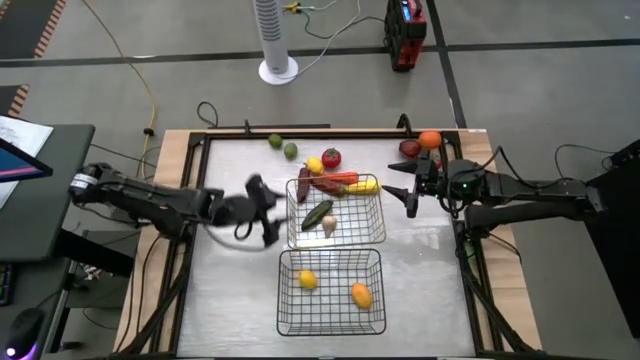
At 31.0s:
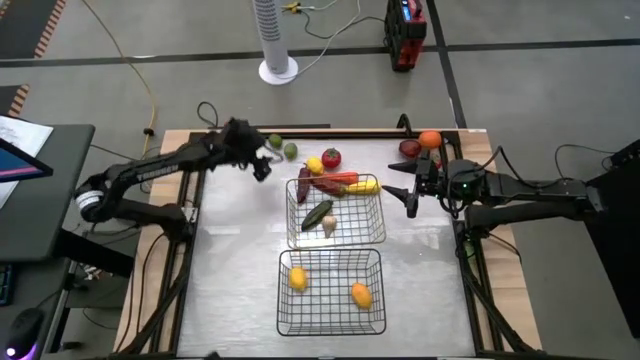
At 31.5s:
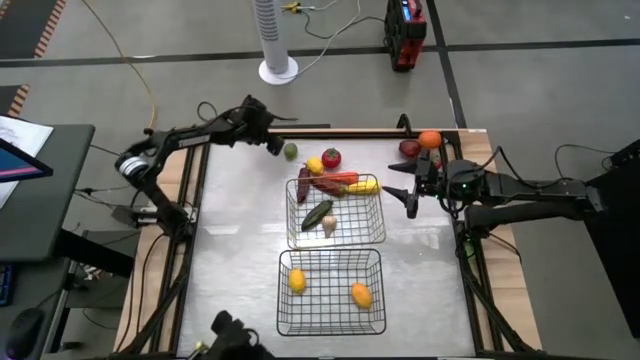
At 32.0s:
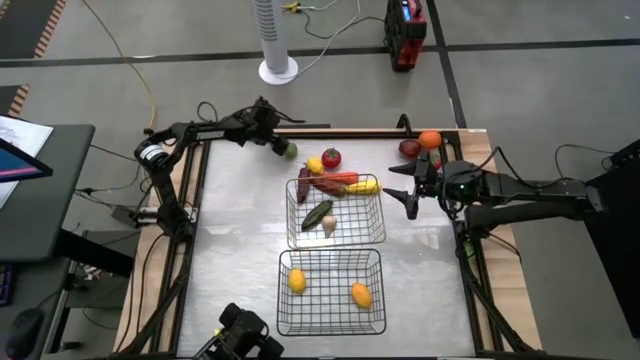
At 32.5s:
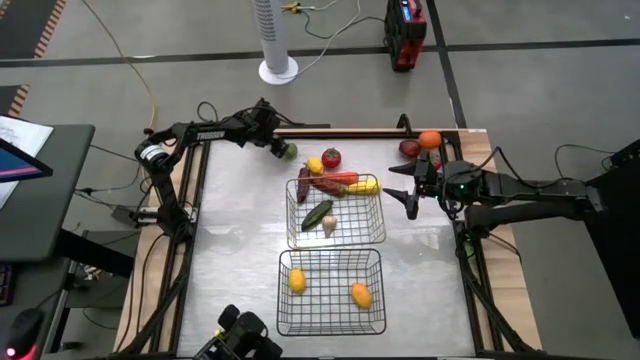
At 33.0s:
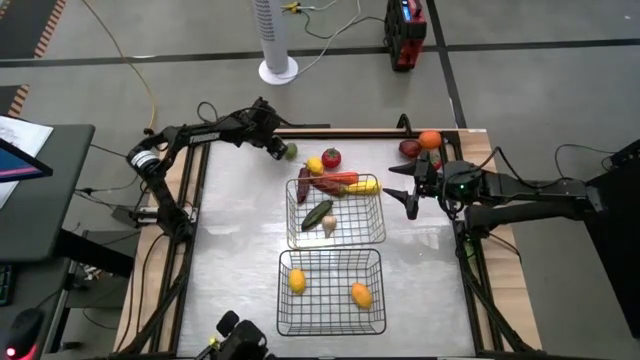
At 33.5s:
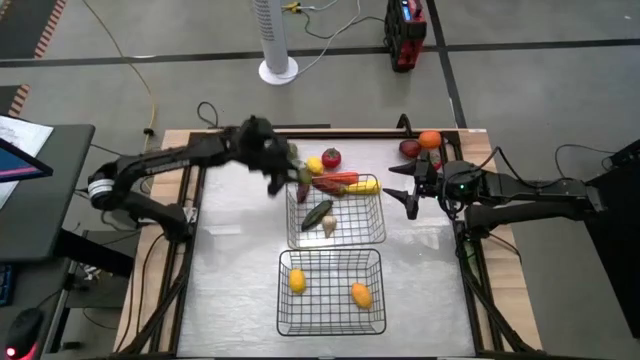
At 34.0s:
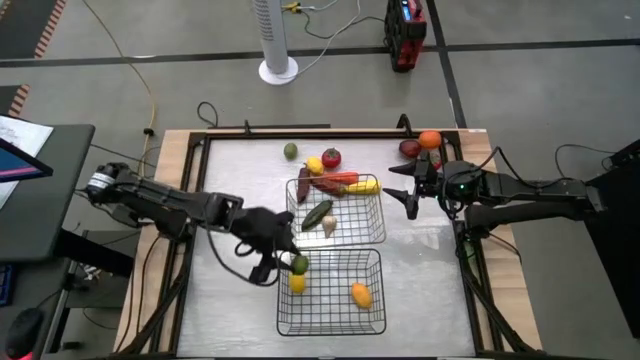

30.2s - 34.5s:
Task: Sort produce into baskets
Put the lime into the bottom wire basket

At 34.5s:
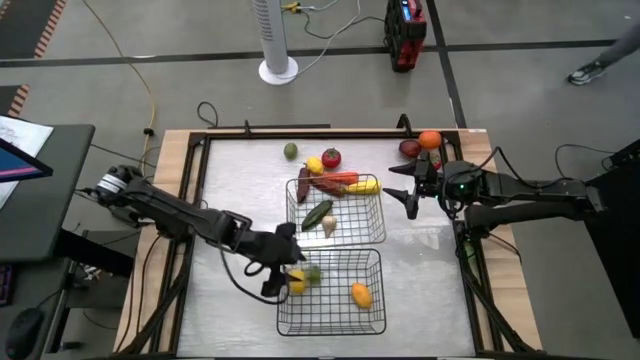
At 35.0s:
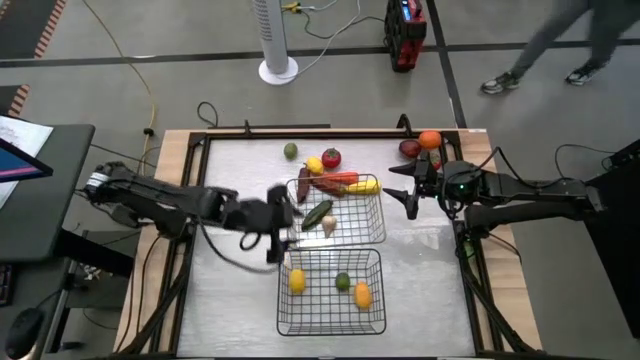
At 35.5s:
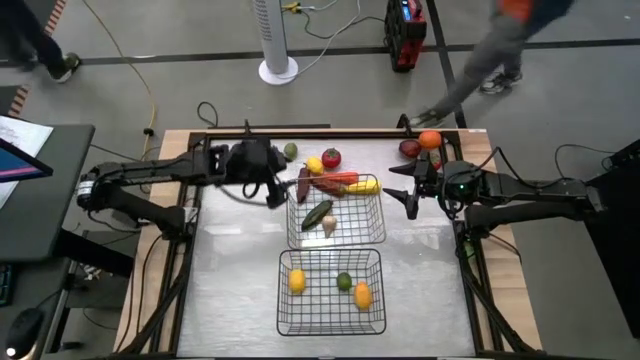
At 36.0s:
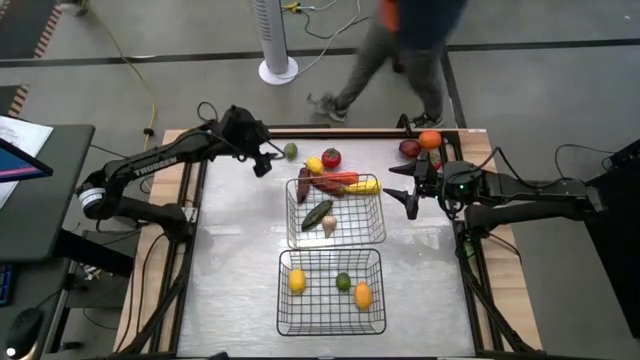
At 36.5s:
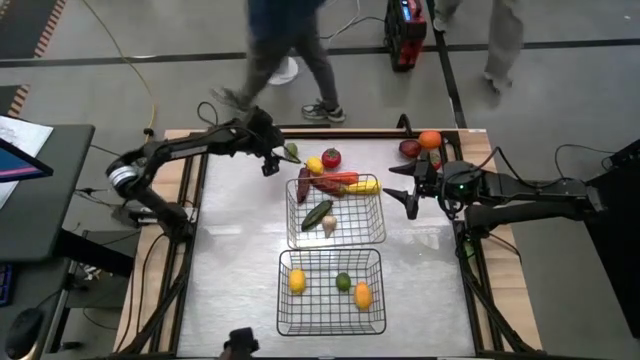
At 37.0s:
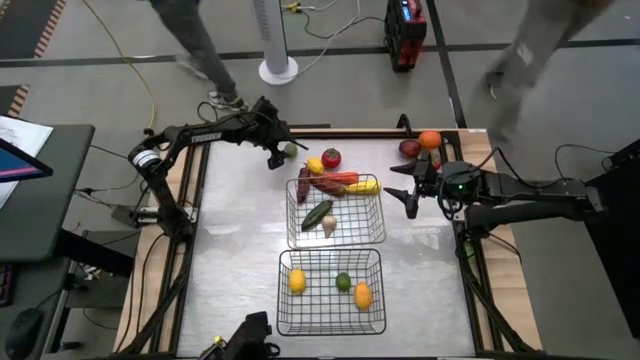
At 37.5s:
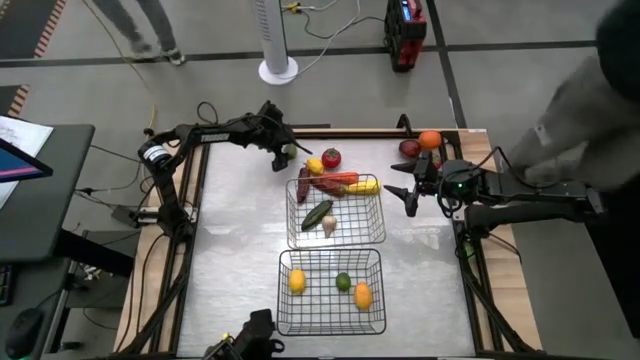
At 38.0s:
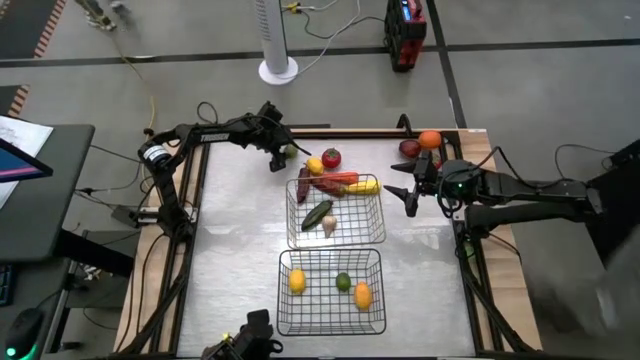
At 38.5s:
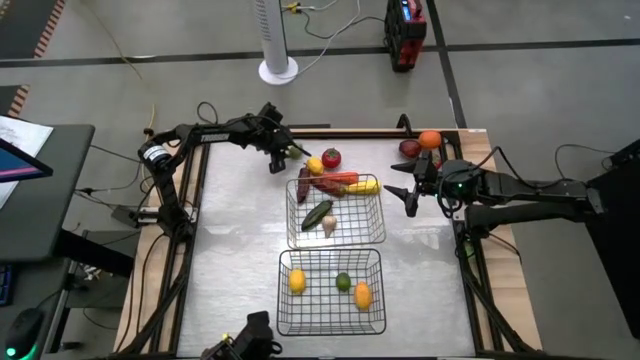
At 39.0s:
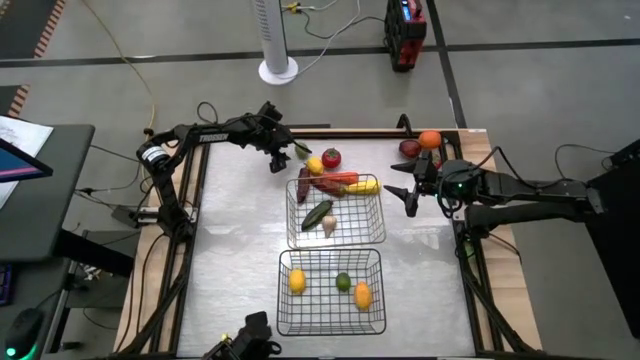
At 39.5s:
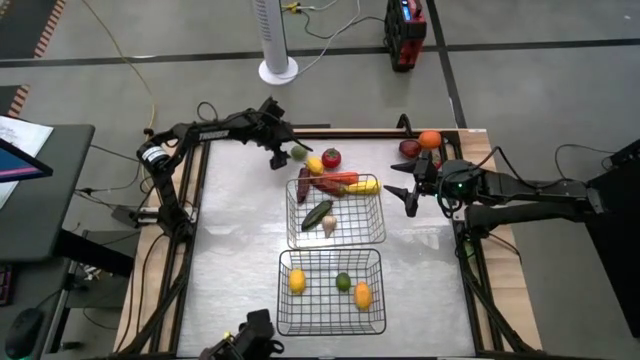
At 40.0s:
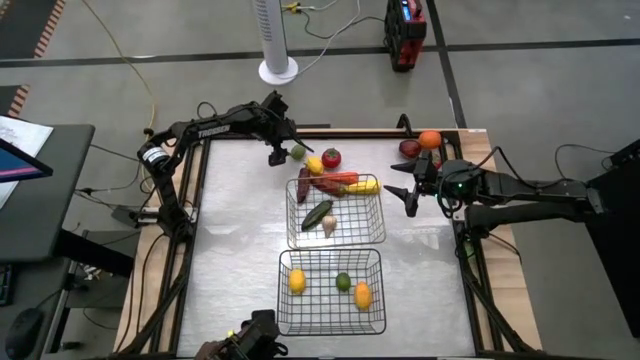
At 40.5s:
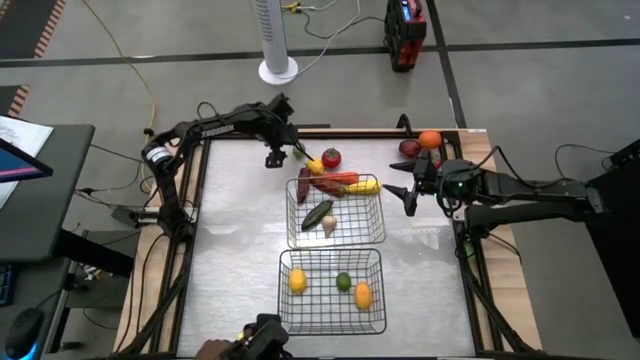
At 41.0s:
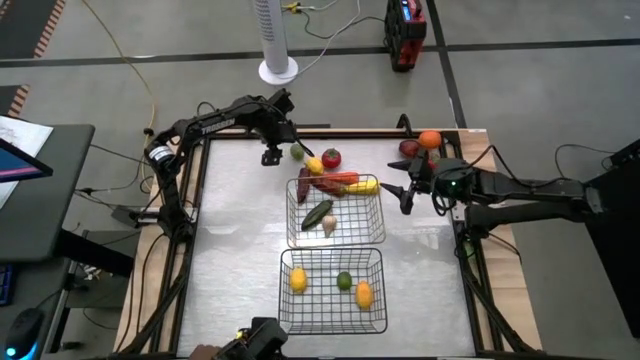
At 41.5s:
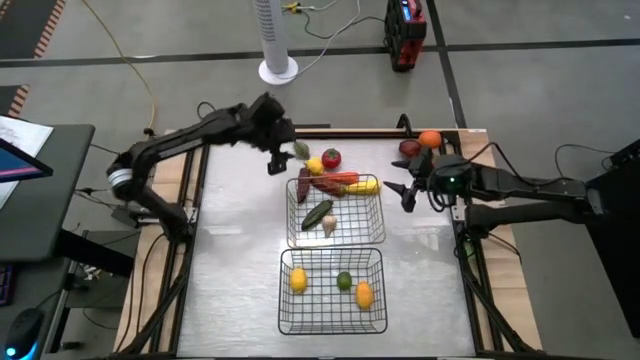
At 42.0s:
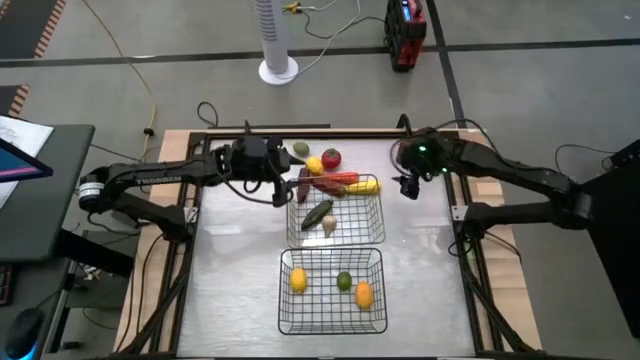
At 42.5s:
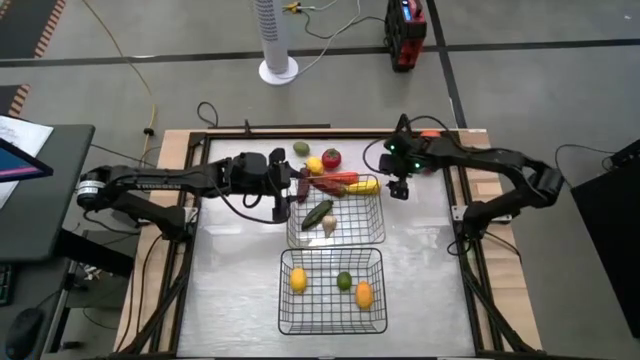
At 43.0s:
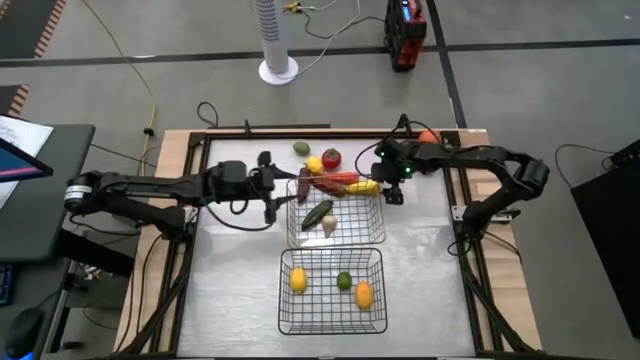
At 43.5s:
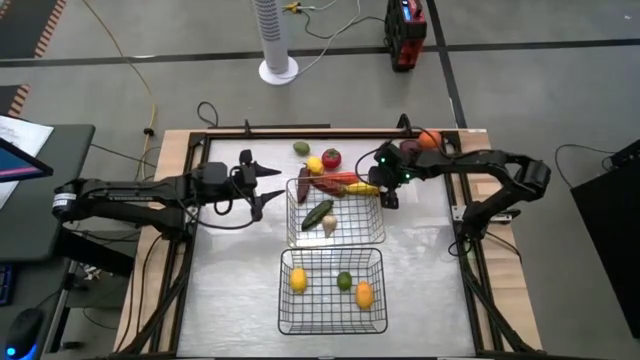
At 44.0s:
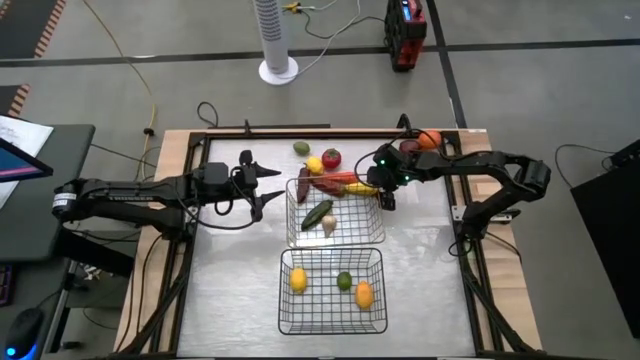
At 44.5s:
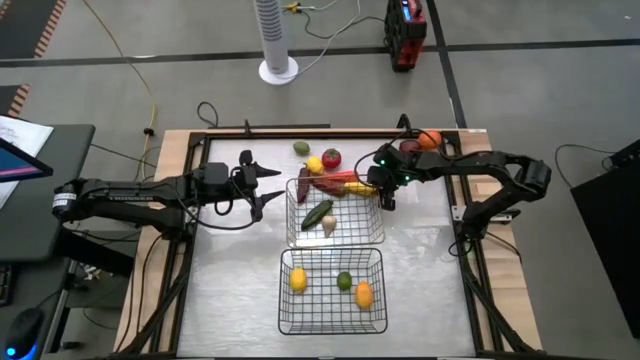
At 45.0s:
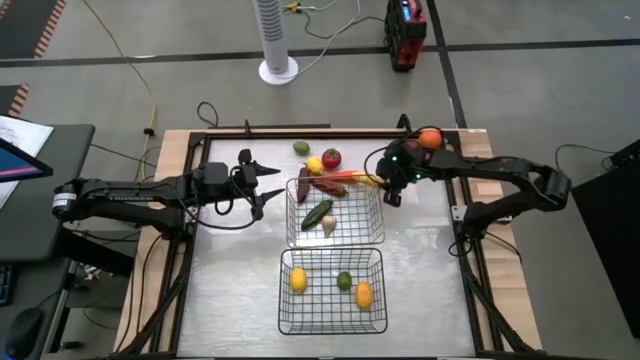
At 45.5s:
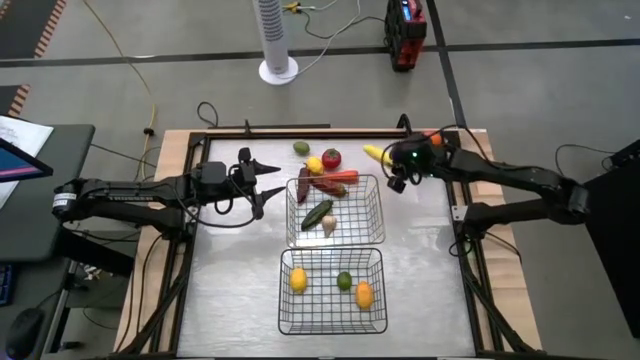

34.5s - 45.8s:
Put the corn into the top wire basket

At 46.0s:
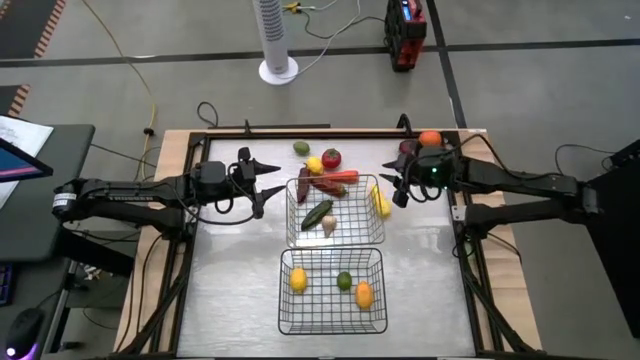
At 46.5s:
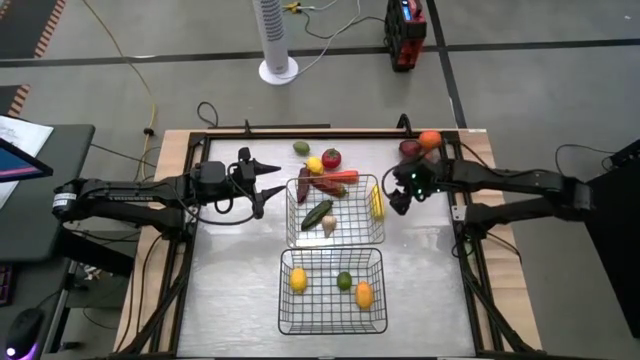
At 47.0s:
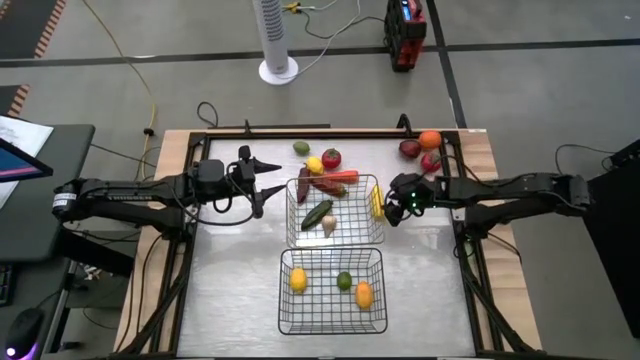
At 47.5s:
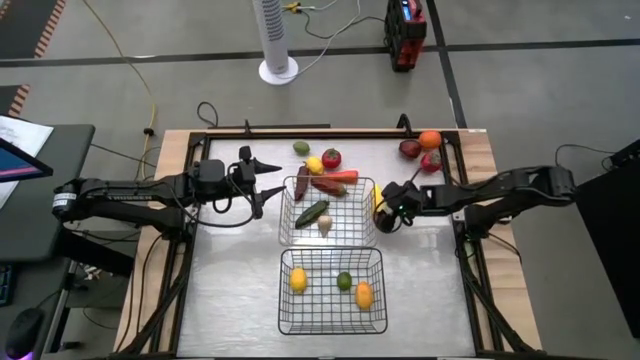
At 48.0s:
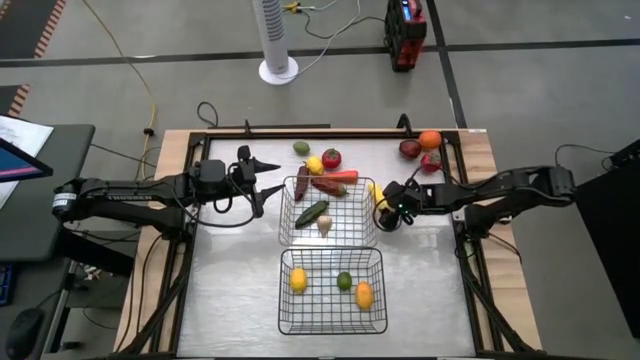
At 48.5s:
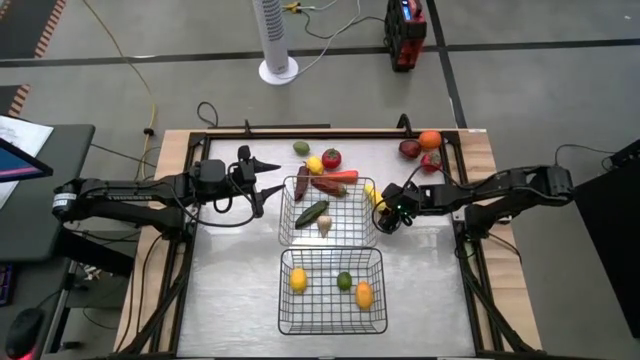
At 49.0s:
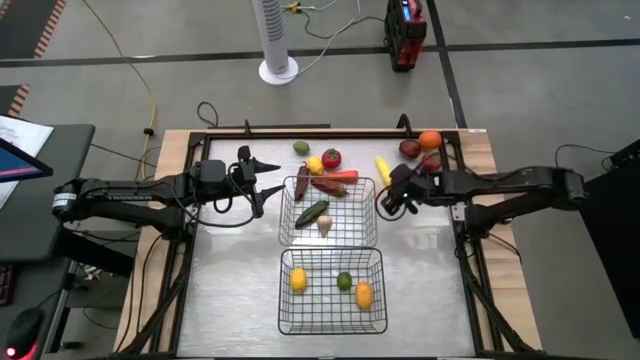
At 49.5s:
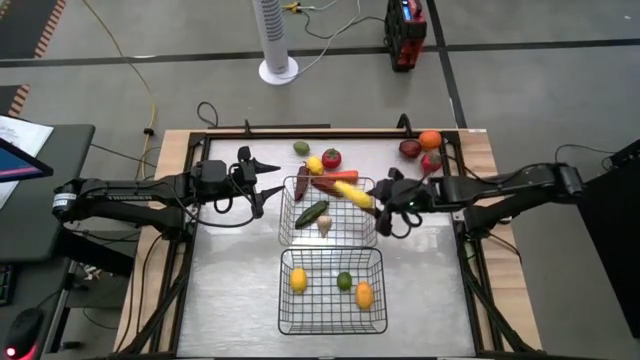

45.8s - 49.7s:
Put the yellow corn into the top wire basket

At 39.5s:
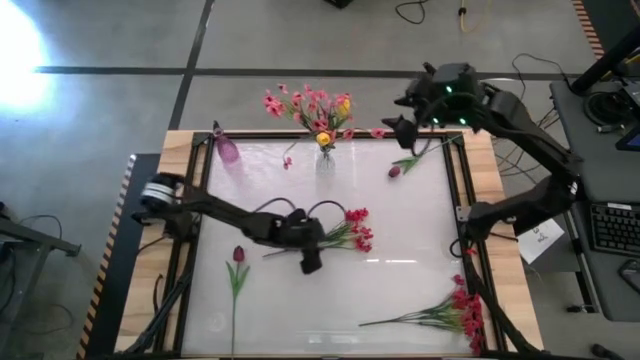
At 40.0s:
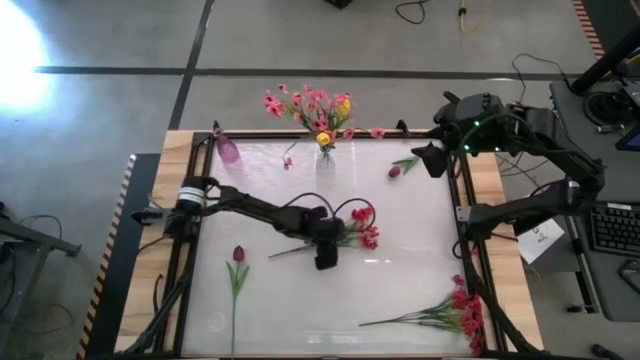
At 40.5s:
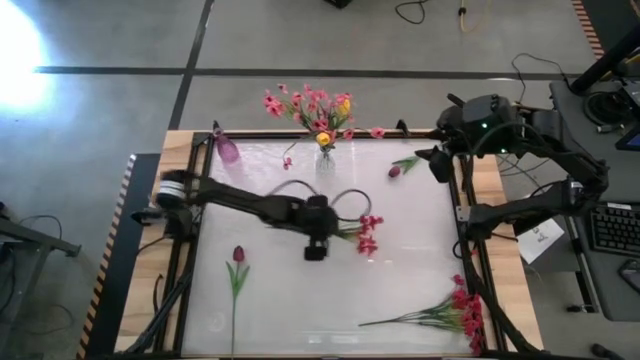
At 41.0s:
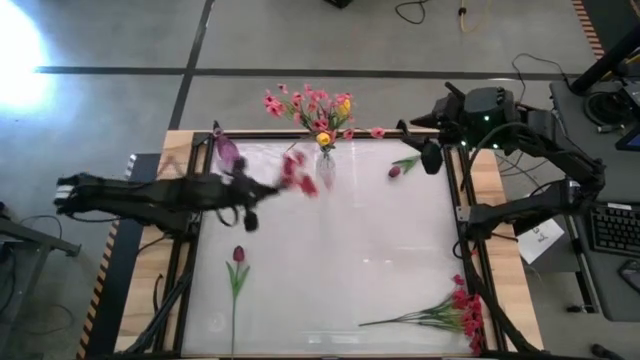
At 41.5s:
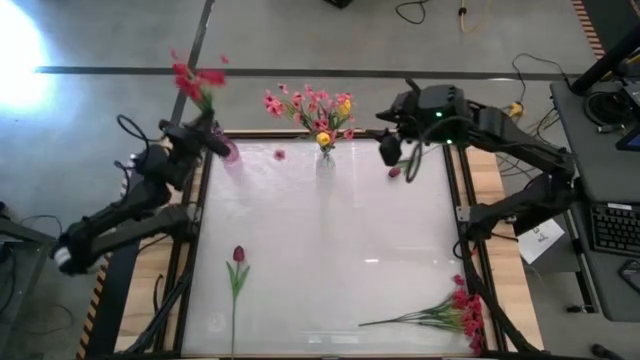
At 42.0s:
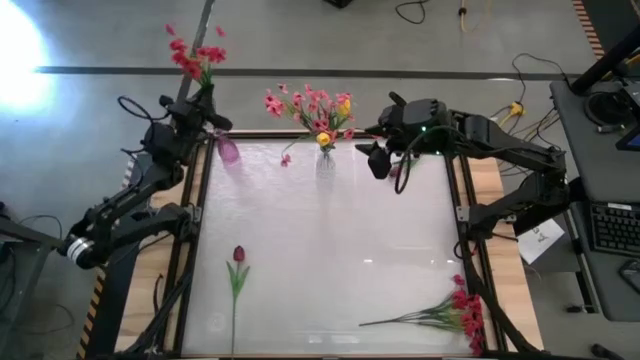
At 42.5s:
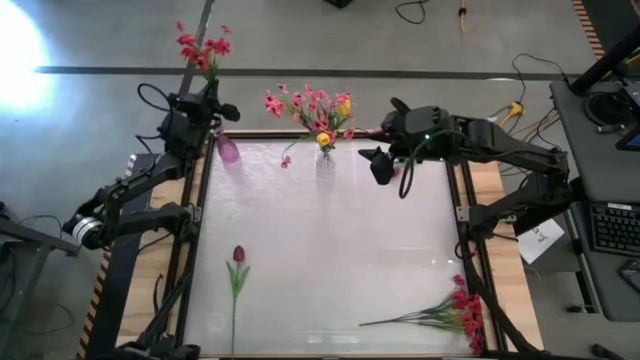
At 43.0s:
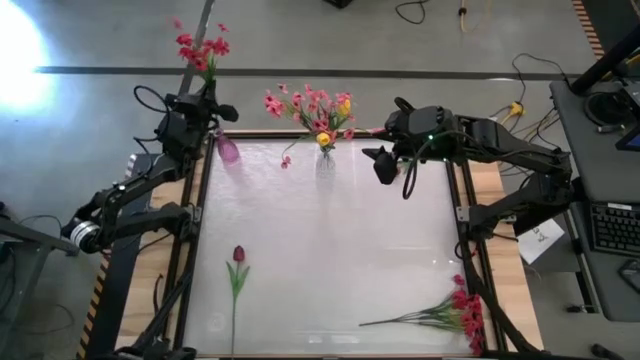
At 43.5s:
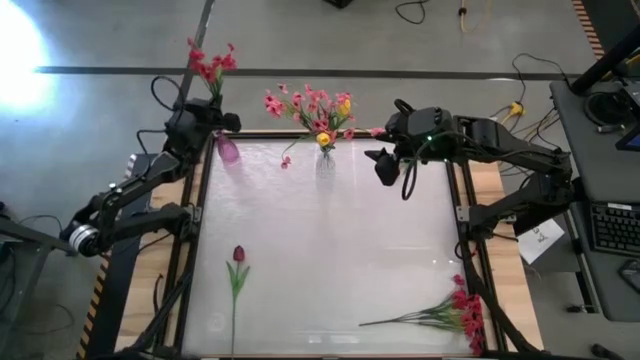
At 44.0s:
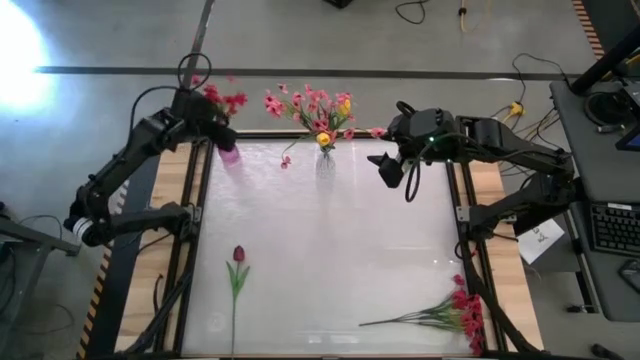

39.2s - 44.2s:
Task: Sort flowers into vase by color
Put the top red flowers into the purple vase
